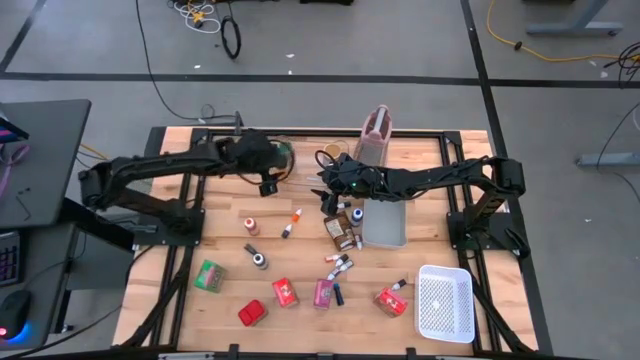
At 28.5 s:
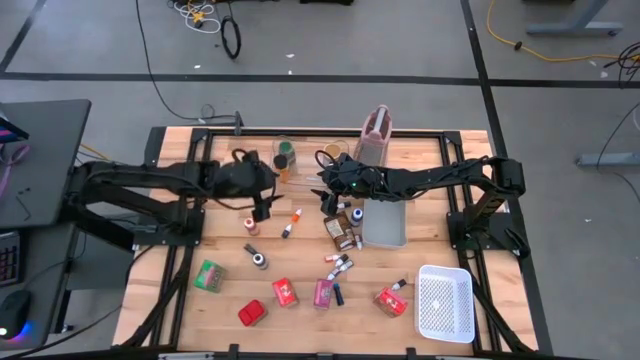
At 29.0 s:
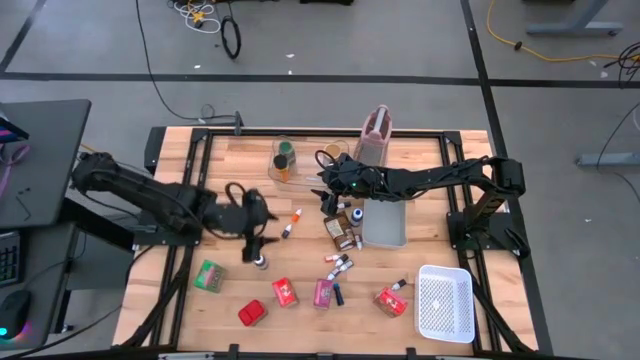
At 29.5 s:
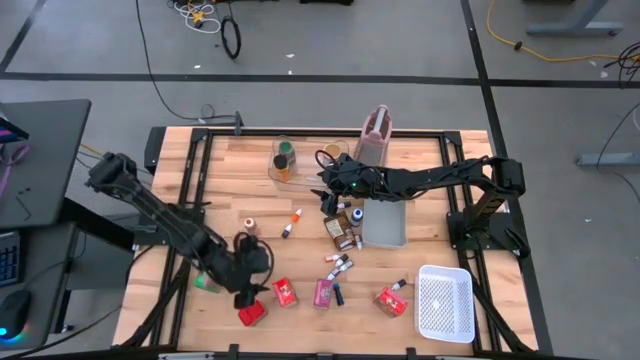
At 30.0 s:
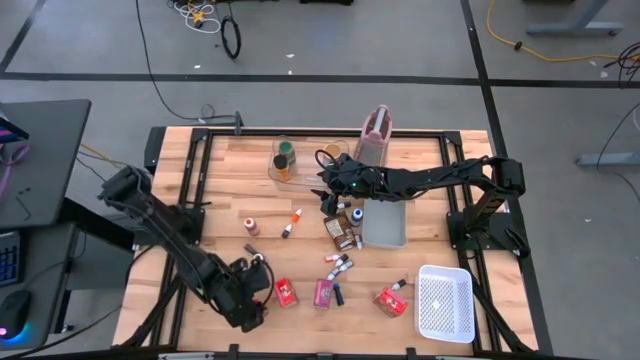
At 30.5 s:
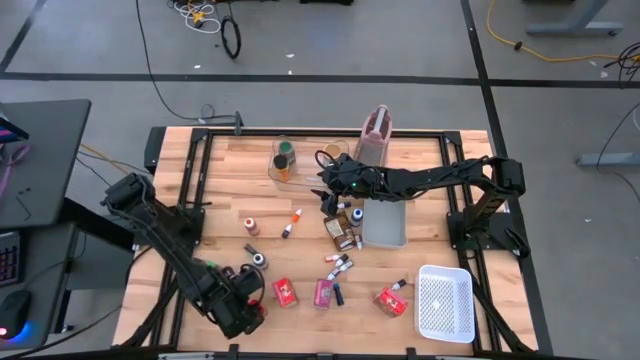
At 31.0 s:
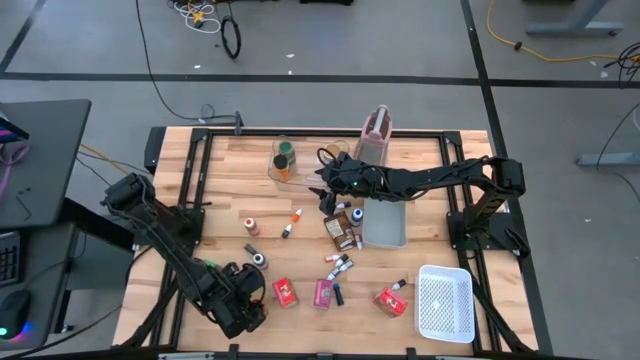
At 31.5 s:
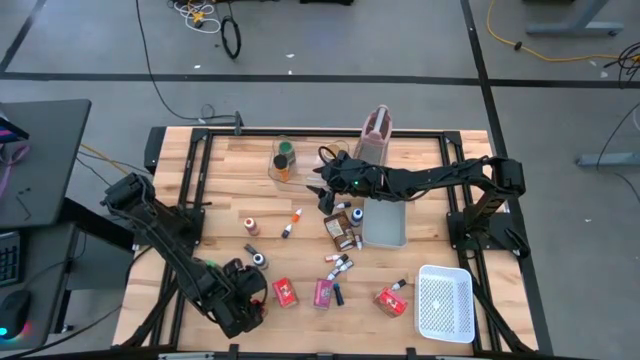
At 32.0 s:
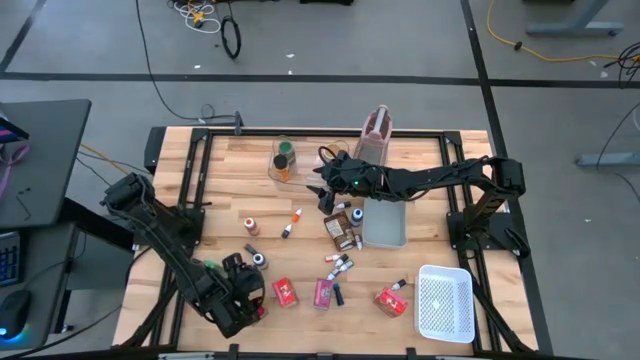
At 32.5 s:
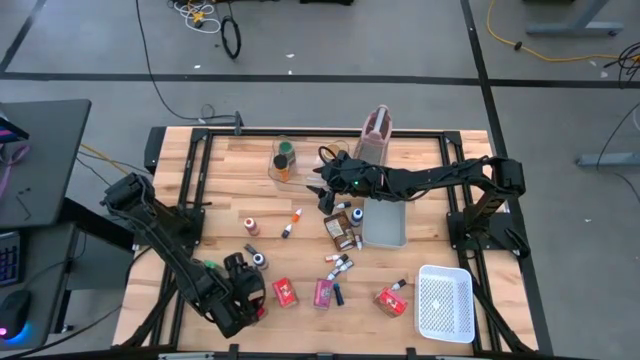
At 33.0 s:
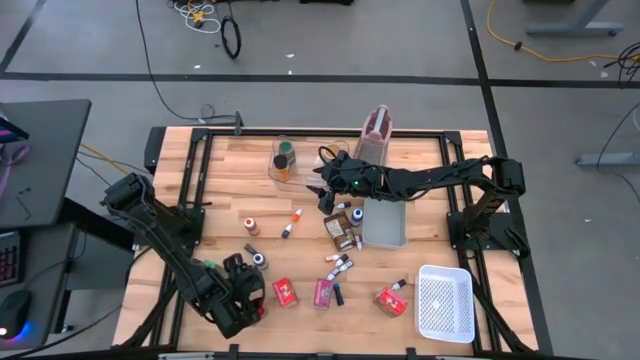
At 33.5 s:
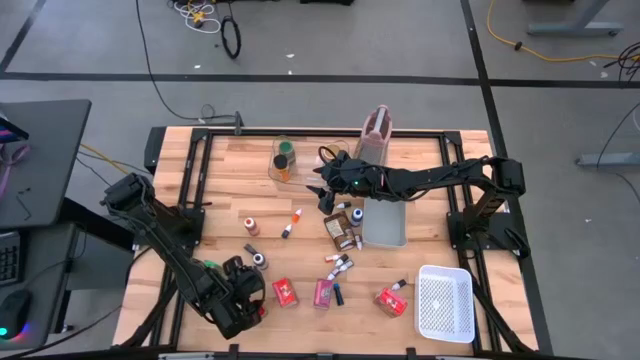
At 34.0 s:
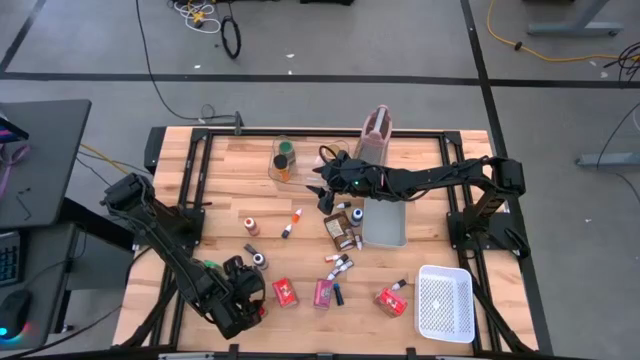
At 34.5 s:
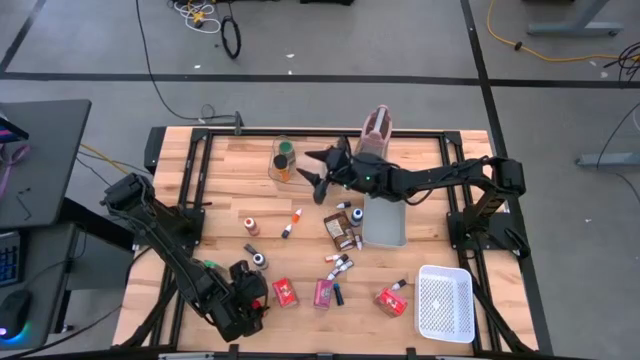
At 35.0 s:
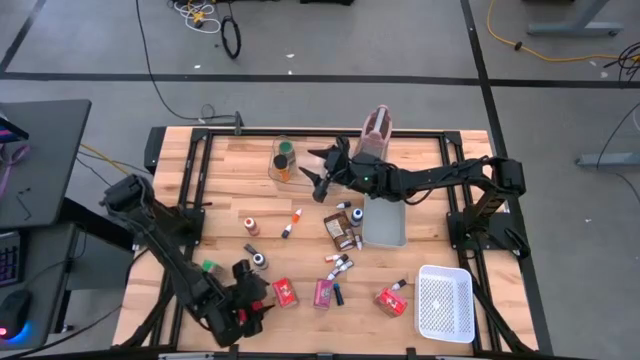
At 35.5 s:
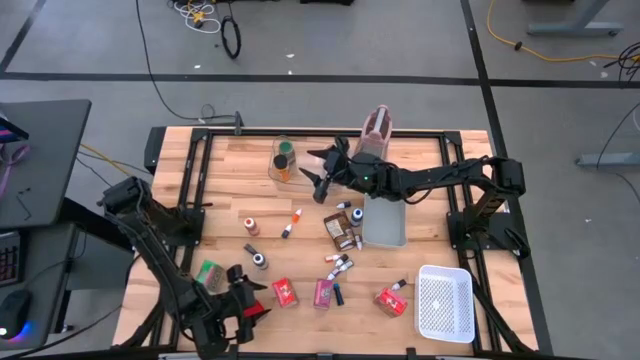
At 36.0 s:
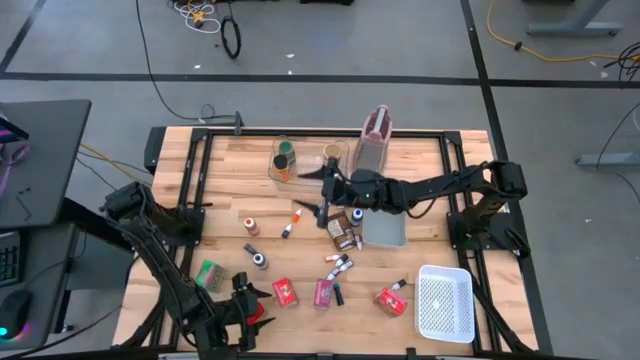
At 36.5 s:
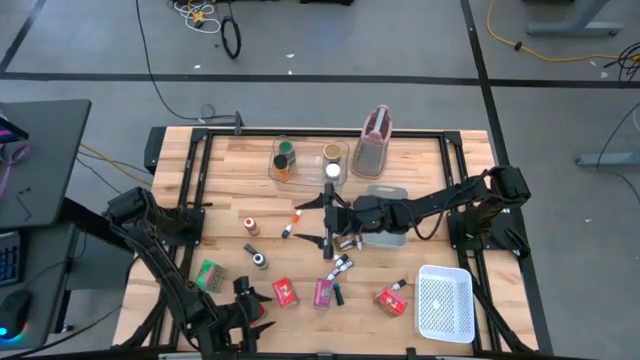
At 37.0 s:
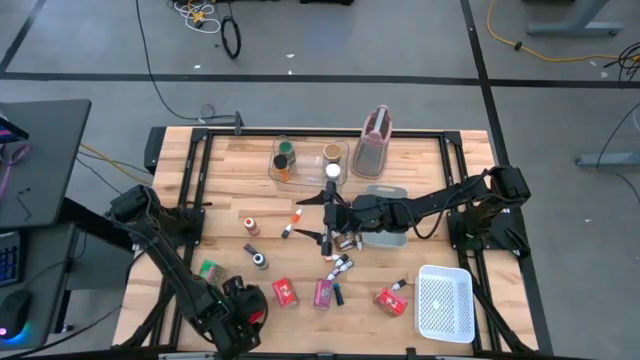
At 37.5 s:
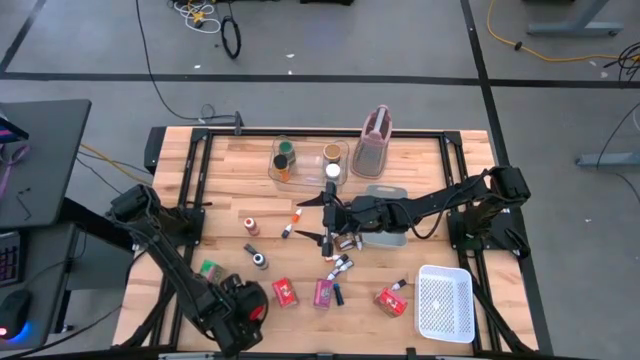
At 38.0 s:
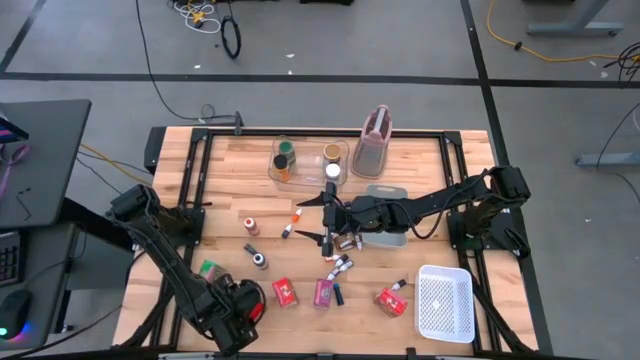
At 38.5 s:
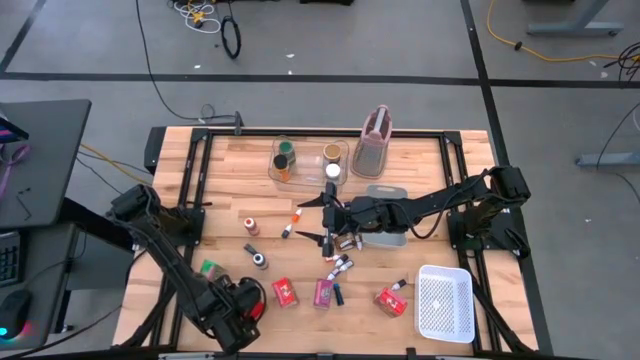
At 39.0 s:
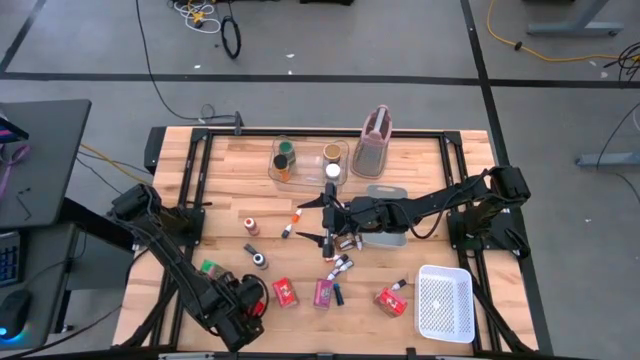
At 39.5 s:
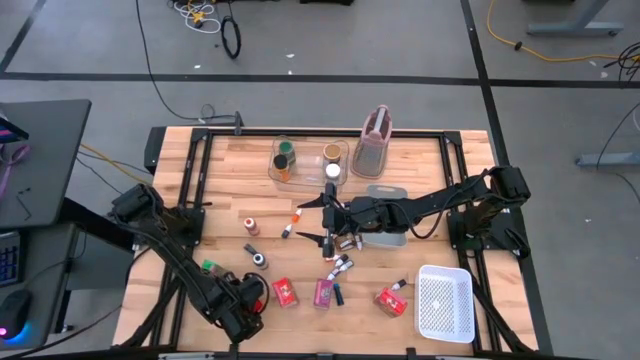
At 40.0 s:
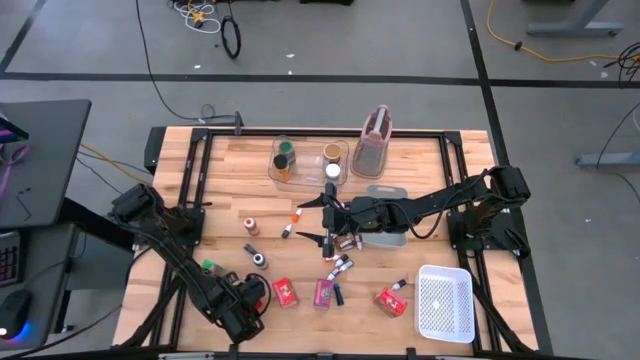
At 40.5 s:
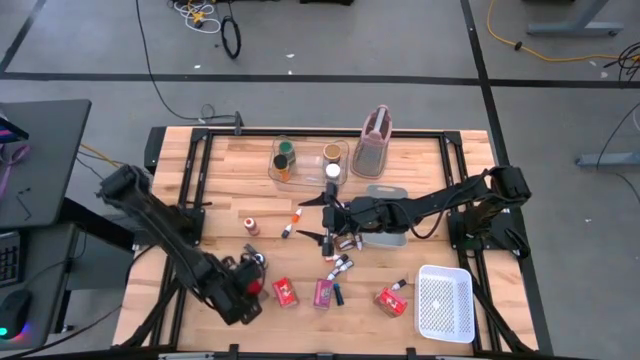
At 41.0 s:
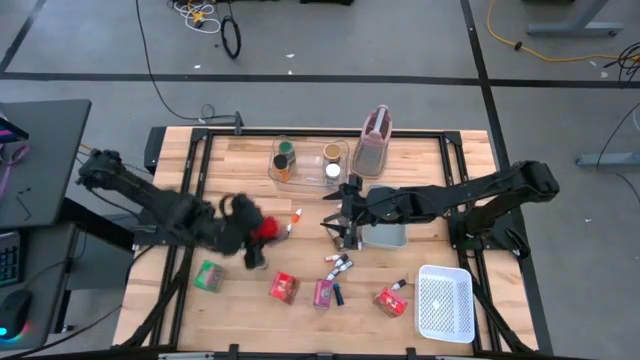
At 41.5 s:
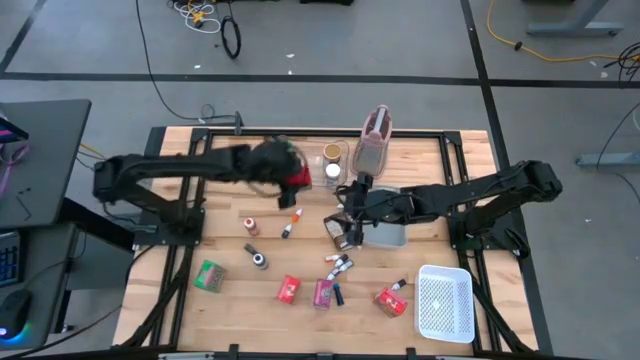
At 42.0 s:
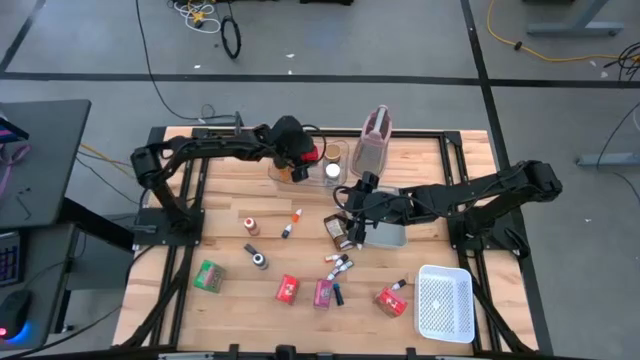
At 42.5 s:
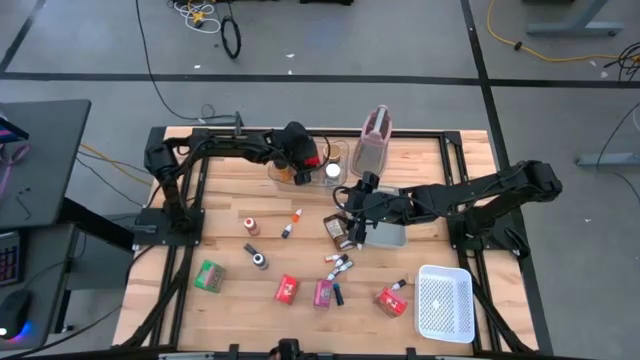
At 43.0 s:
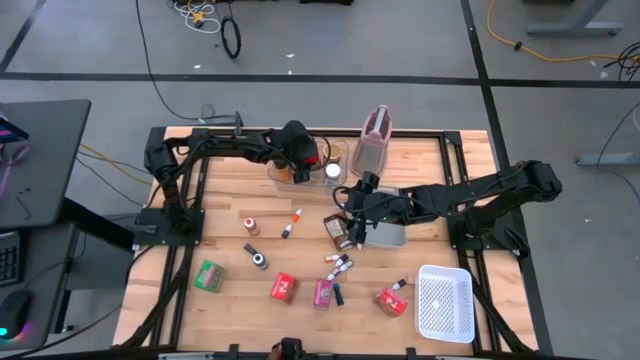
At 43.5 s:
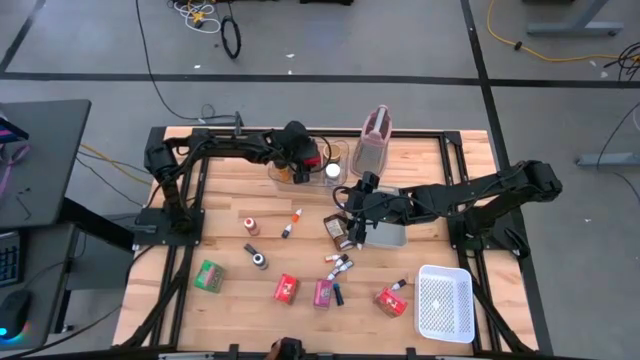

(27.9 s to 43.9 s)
Task: Pick & Place Kitchen Items
Put the red seasoning can into the transparent bin

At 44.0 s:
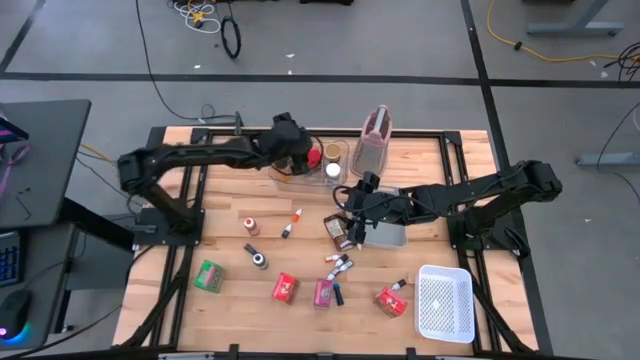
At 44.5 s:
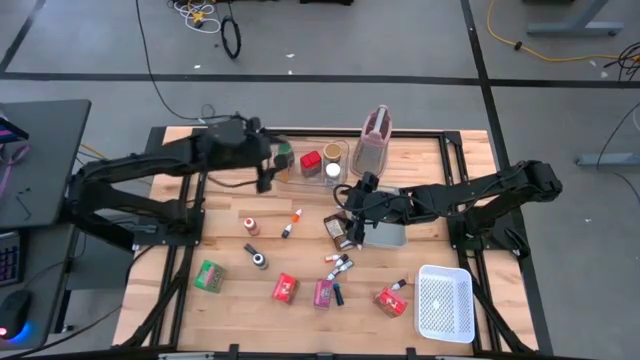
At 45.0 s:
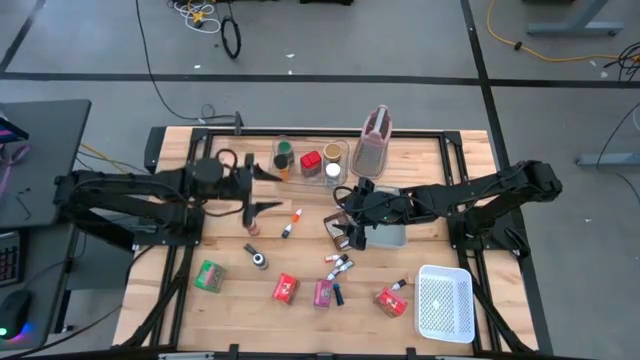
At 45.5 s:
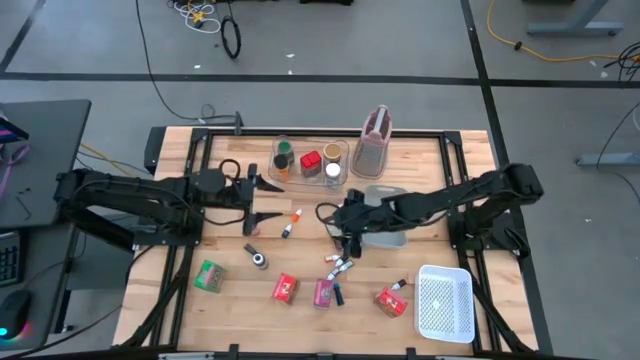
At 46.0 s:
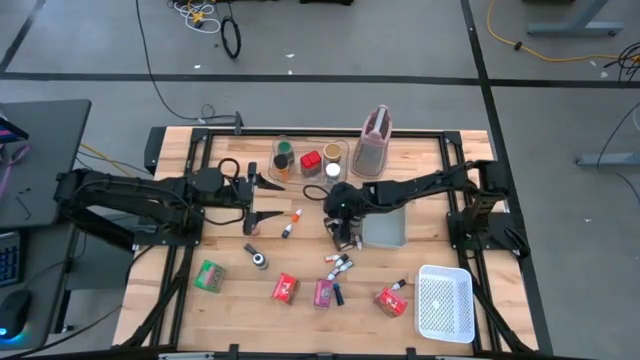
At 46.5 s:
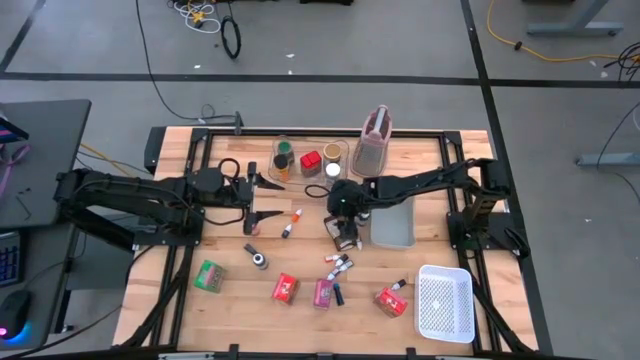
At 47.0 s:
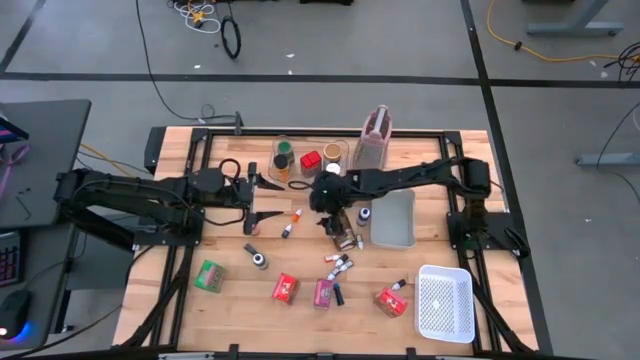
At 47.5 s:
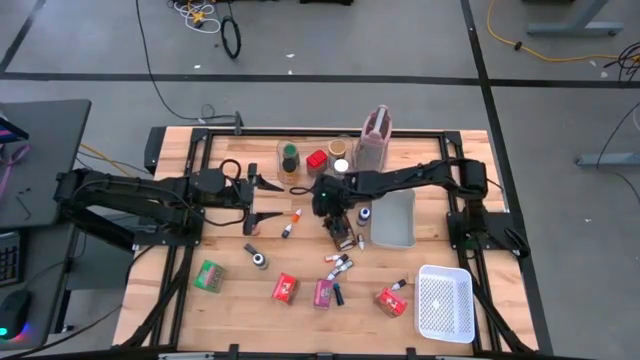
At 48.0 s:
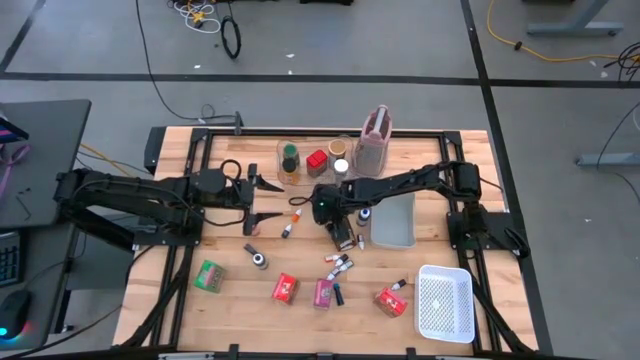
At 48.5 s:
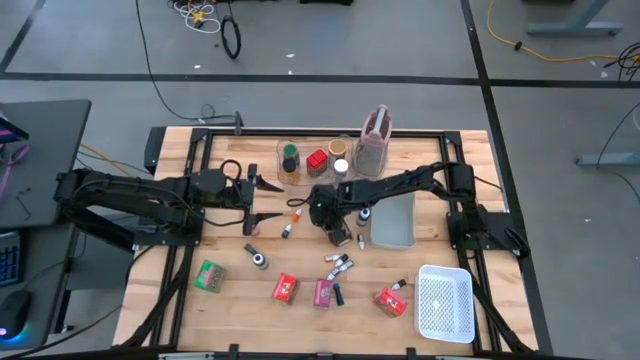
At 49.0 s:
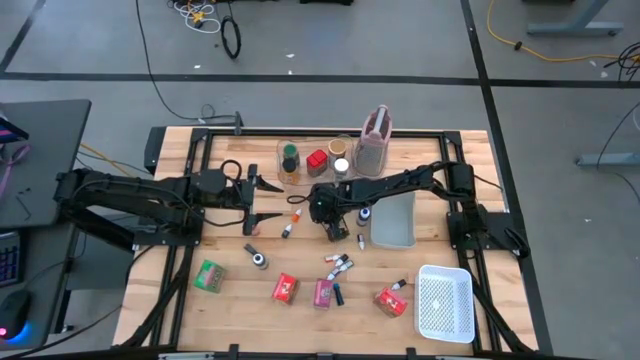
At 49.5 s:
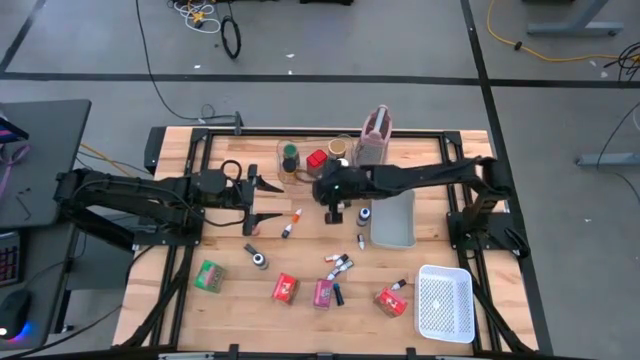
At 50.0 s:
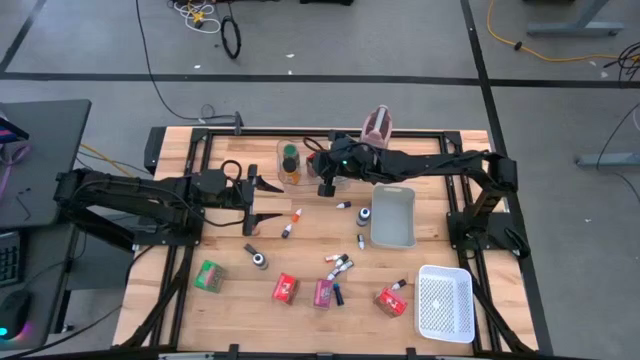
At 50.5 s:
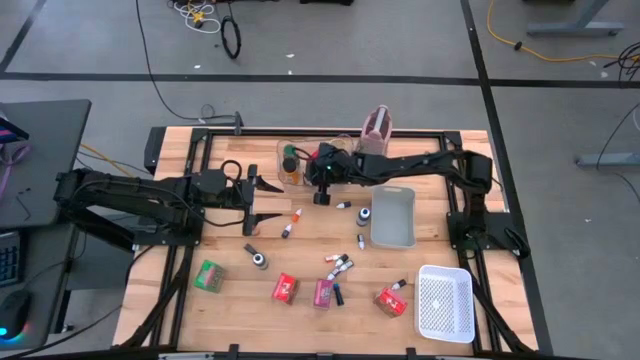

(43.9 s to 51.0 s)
Put the orange seasoning pack into the transparent bin
